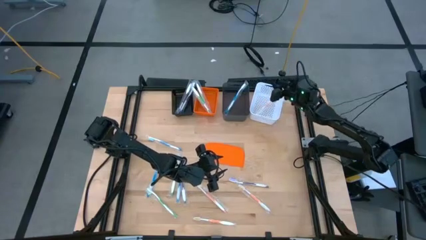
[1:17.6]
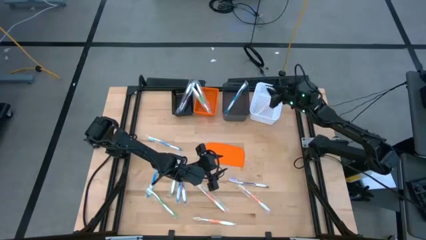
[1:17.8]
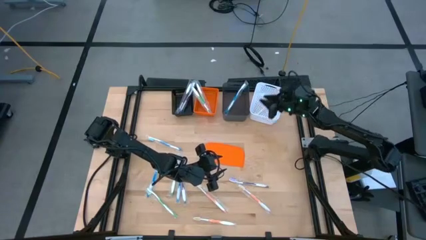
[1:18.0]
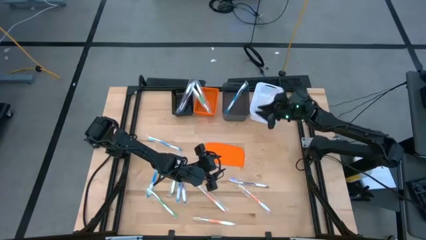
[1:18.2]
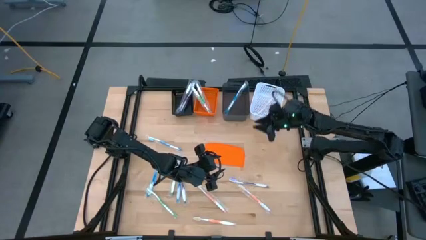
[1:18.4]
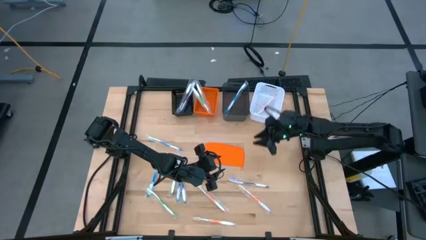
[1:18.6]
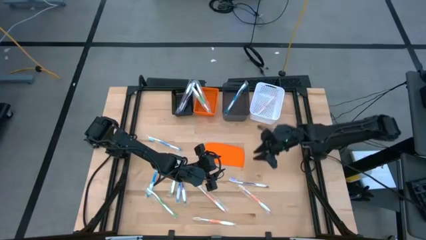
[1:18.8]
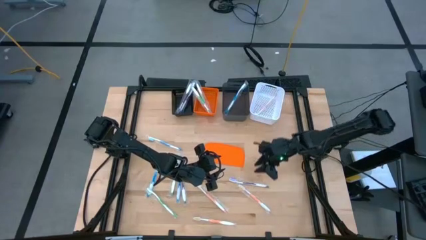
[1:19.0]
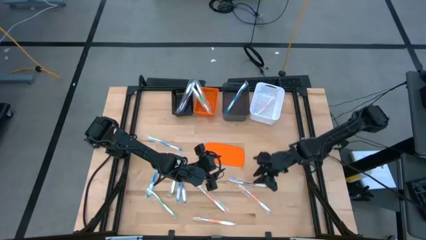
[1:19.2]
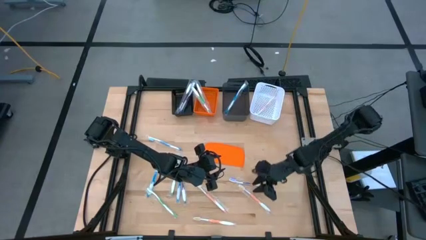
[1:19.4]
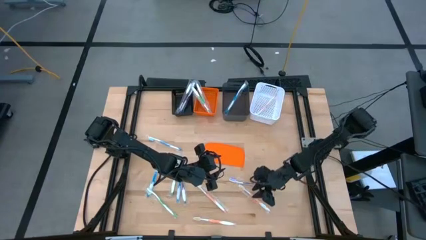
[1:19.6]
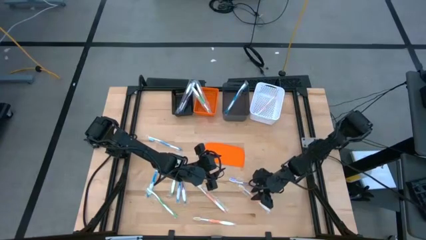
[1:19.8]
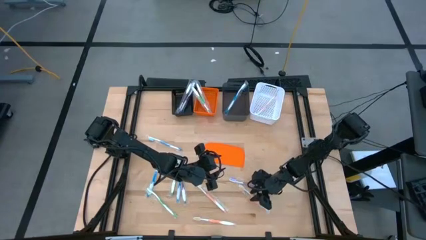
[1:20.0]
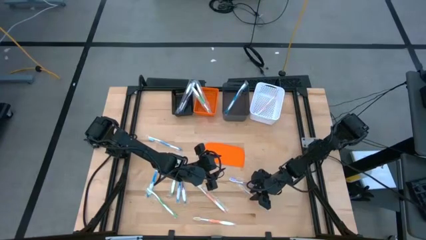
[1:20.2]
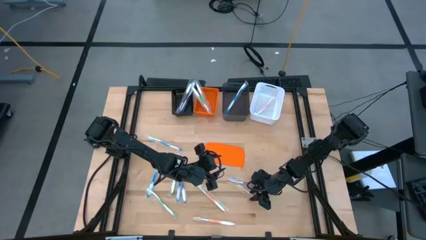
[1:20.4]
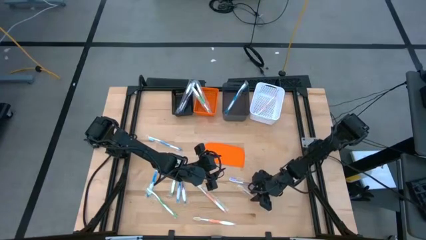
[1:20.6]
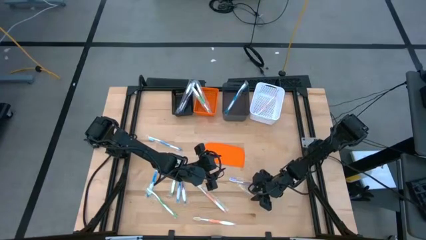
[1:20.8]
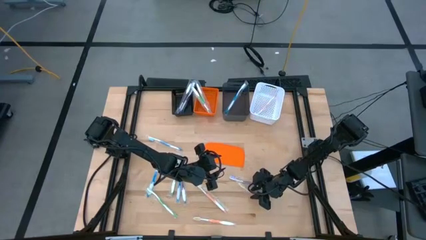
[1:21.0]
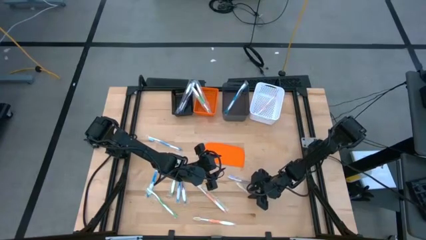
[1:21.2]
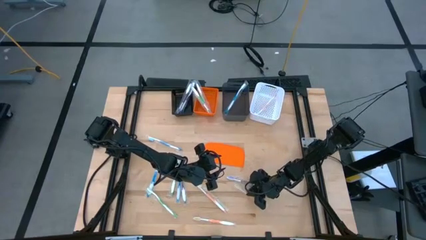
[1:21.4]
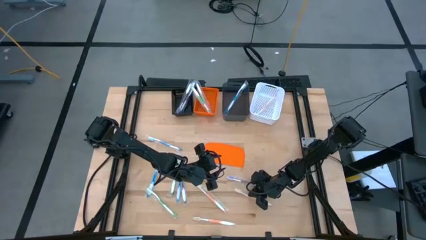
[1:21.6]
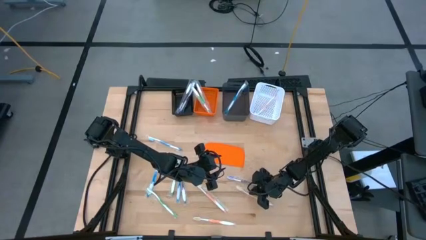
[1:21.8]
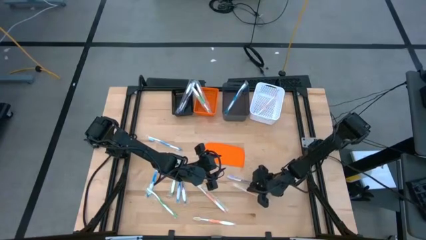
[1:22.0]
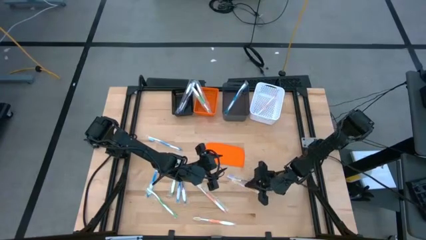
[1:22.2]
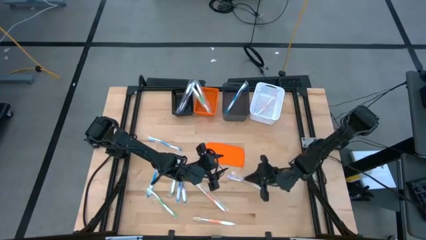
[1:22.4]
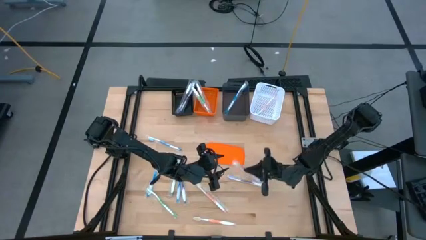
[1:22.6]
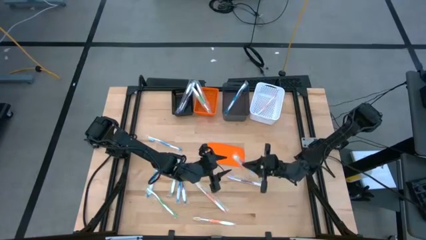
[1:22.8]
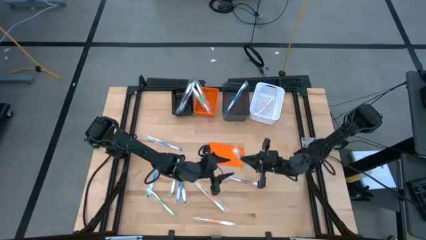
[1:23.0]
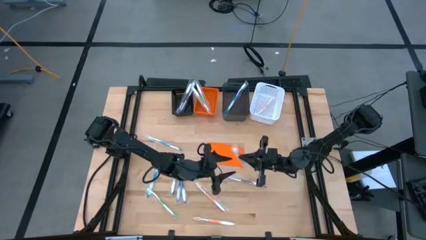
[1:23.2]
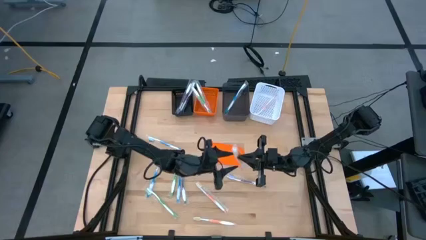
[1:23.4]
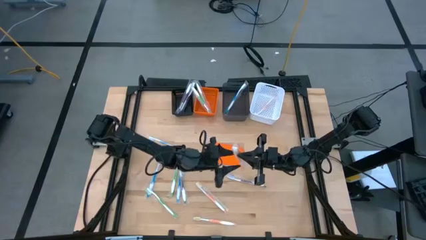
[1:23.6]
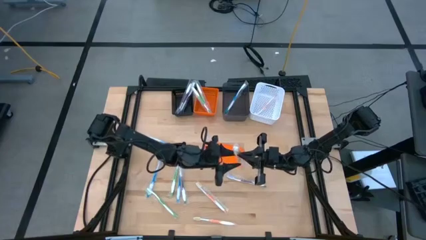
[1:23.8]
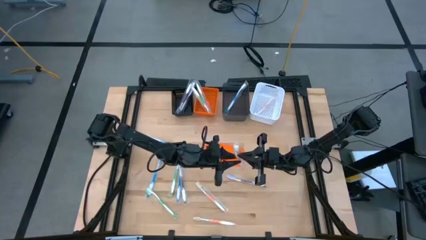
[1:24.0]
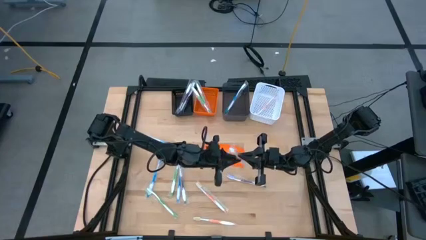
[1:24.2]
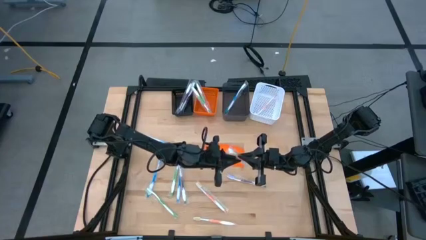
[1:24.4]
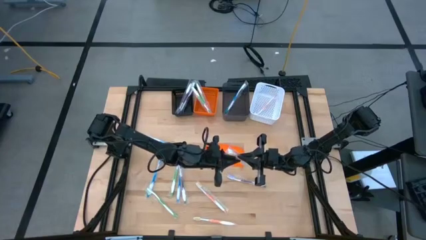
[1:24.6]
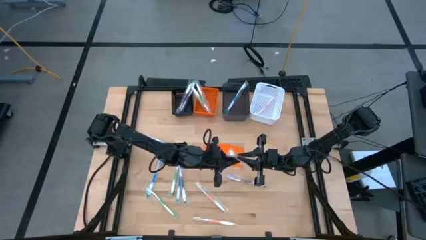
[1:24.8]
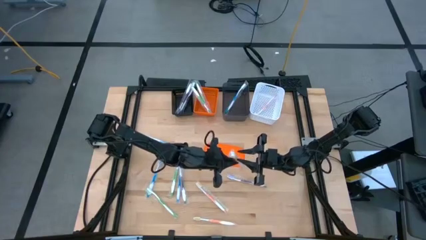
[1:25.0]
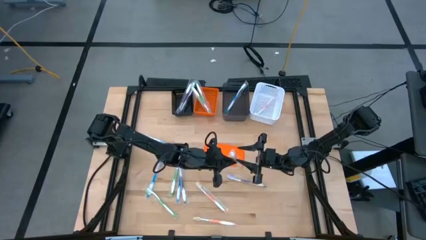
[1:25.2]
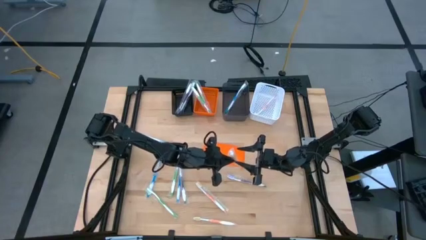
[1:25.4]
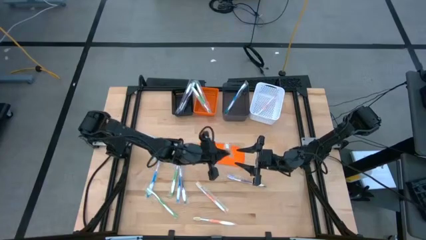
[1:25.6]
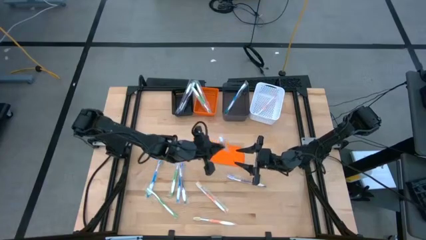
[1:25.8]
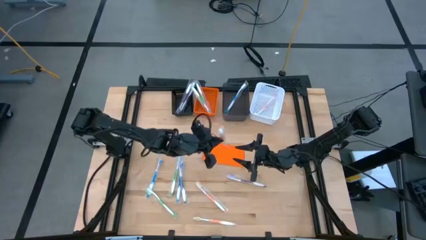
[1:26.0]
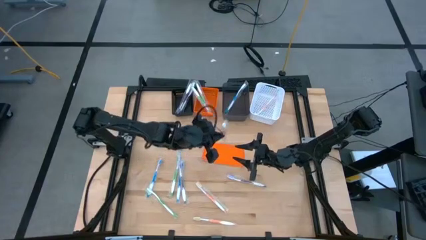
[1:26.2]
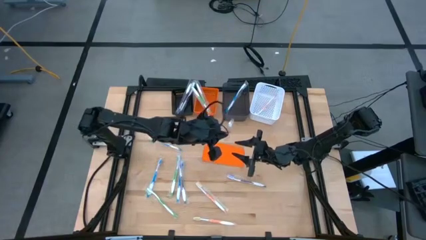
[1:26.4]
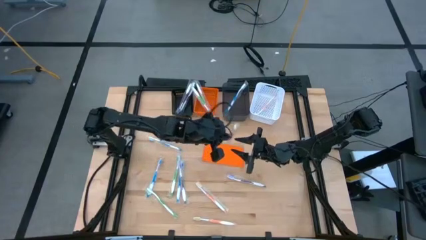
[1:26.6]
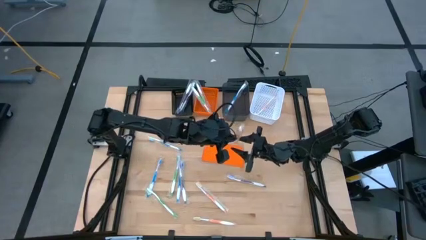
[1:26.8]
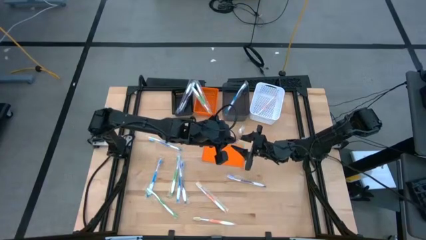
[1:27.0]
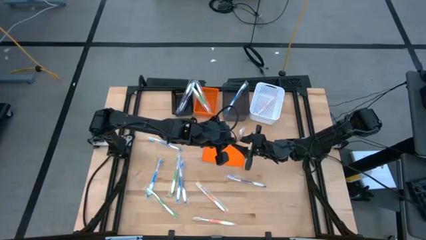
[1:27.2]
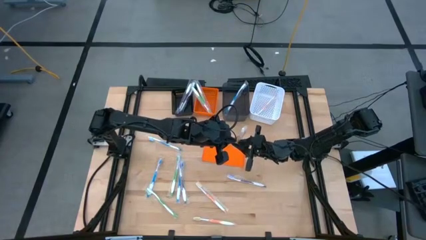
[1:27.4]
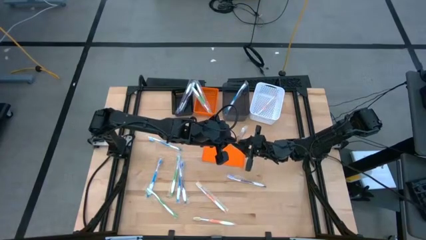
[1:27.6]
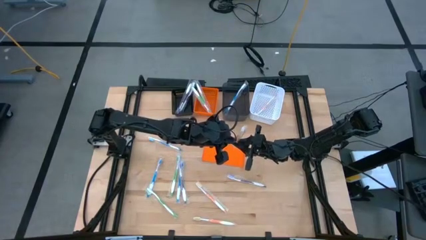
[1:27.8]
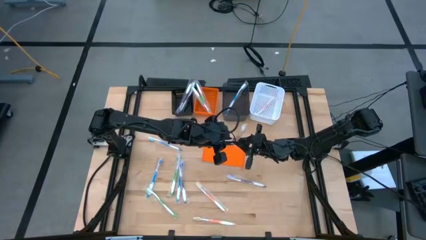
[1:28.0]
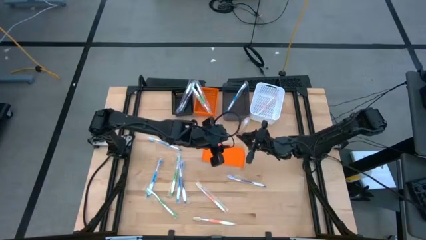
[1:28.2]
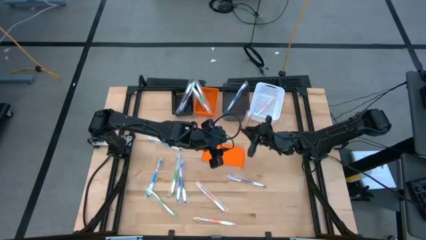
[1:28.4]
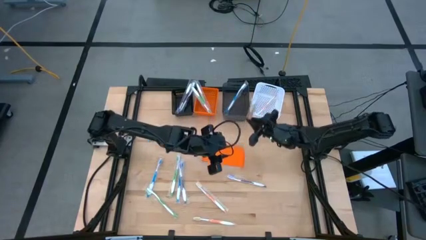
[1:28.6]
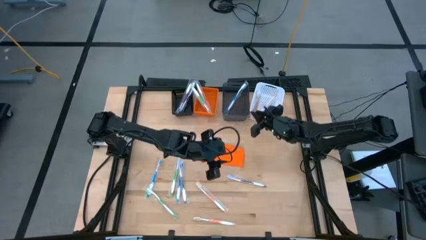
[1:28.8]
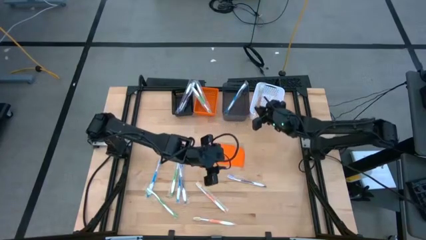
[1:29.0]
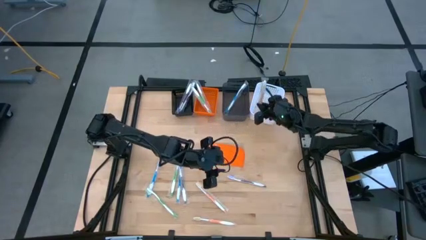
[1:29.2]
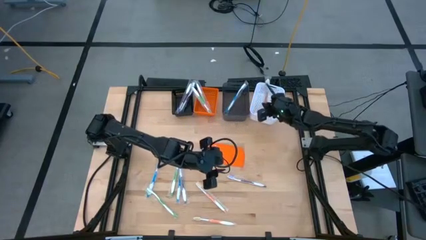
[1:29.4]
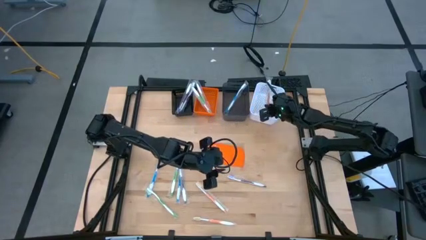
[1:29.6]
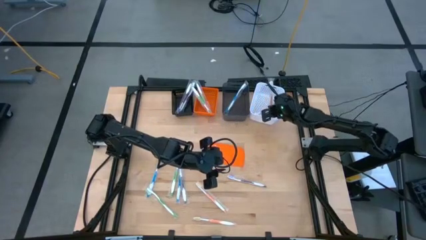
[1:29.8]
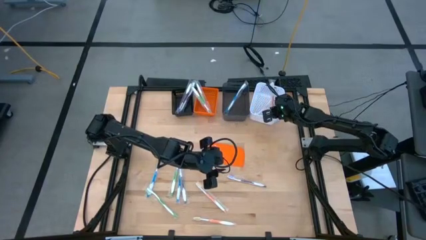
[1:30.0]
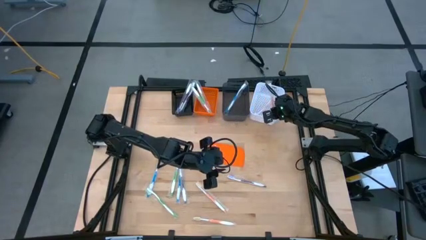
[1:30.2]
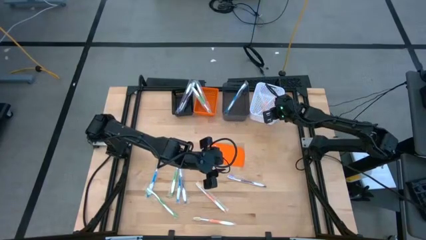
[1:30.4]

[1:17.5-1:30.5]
Task: Pick & Place Toothbrushes
Put the orange toothbrush into the white bin

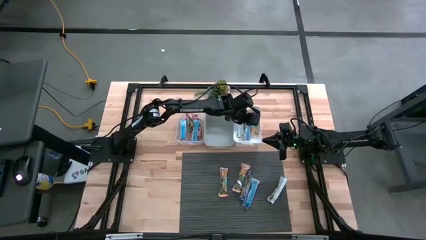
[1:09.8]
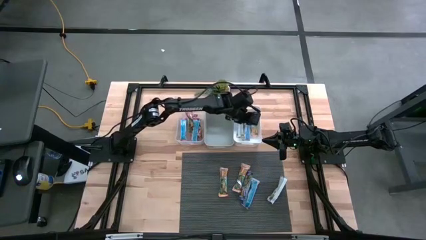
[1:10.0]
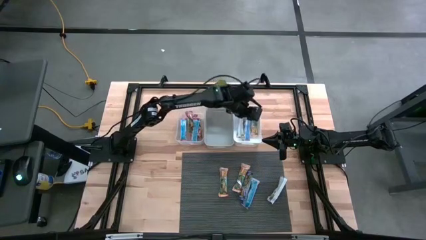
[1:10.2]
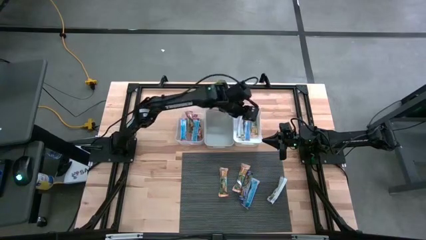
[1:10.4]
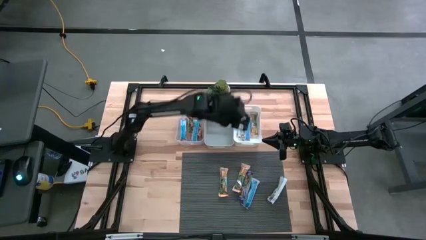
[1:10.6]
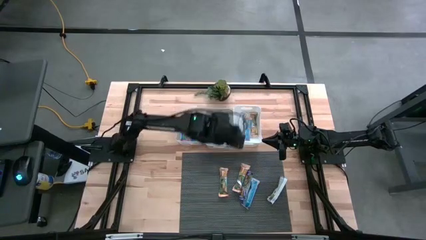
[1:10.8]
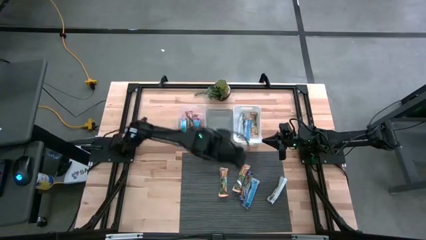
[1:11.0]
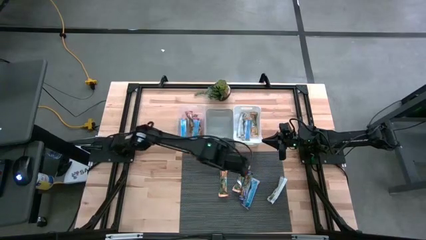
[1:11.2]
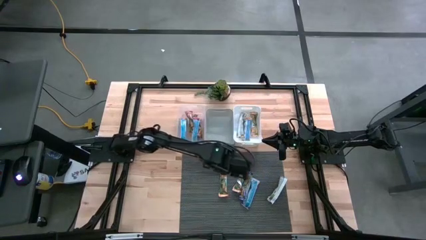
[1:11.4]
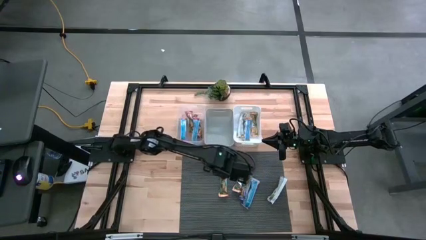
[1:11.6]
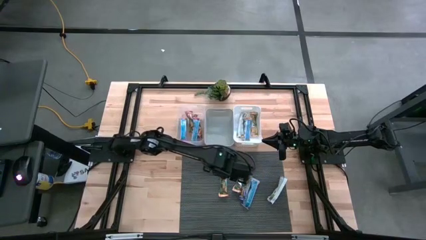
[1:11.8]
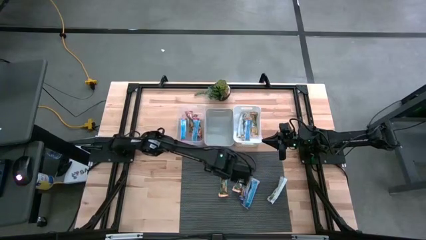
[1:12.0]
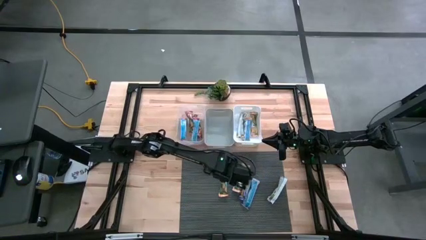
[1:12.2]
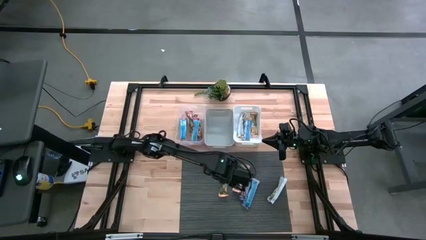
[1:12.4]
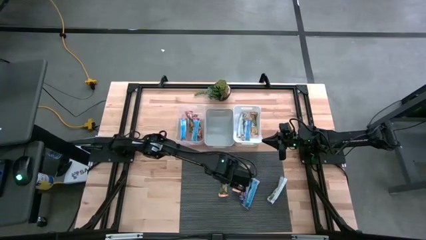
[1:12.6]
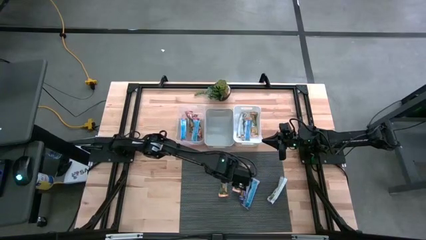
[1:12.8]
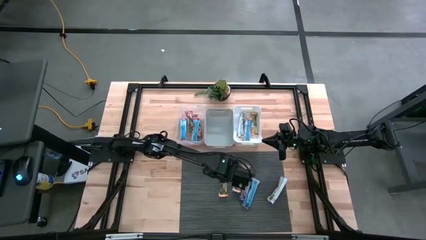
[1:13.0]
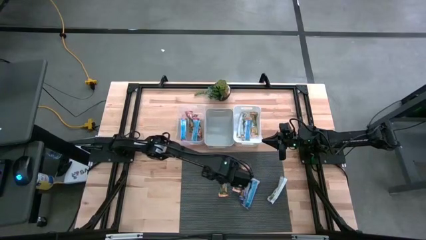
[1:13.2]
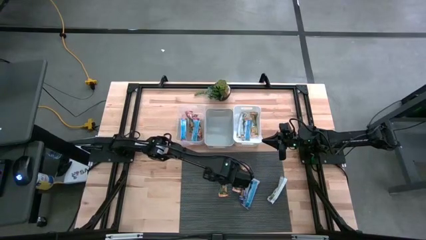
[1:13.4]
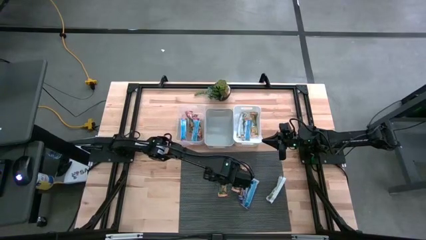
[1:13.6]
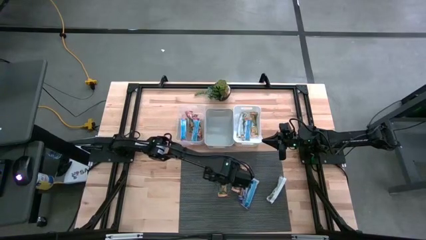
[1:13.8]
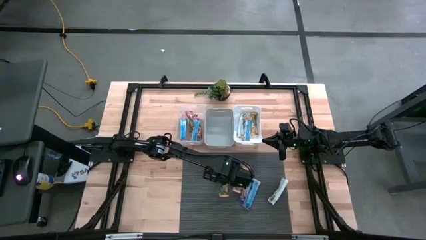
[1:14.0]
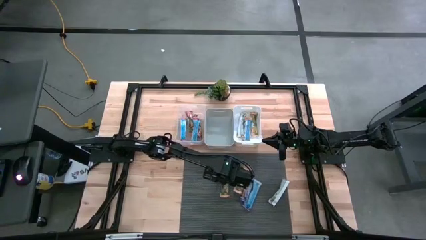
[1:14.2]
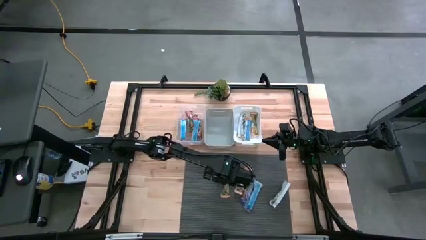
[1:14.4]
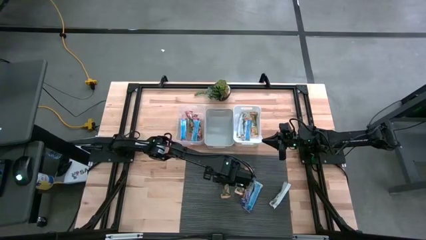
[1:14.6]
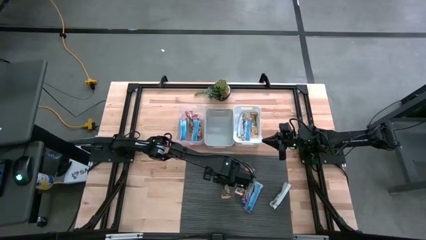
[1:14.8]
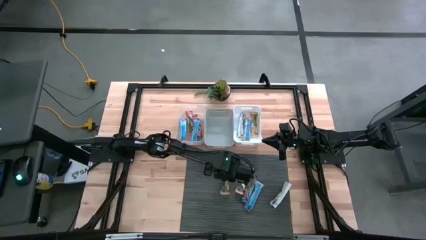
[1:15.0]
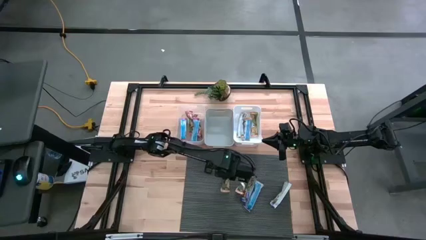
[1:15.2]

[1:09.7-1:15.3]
Task: Pick and place Granola Bars by type
Put the yellow granola bar into the white bin
